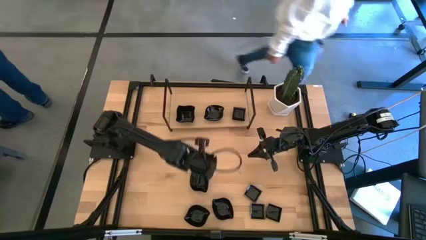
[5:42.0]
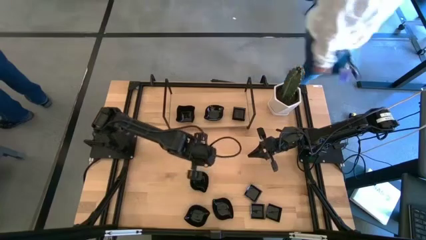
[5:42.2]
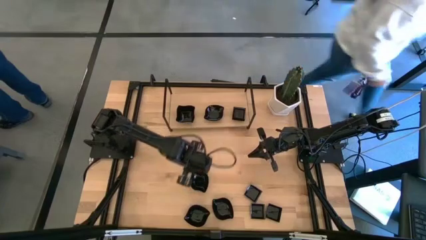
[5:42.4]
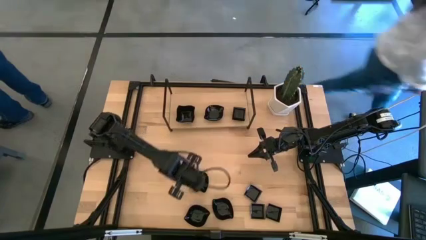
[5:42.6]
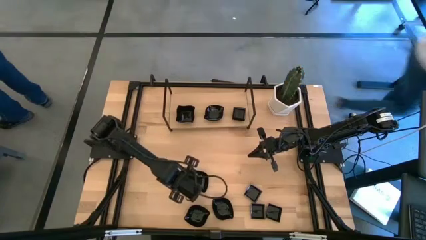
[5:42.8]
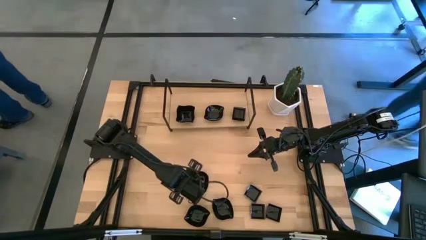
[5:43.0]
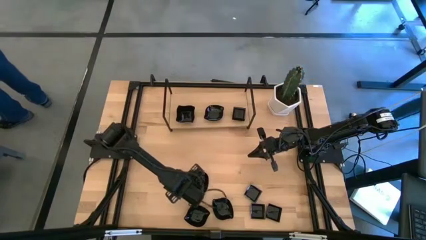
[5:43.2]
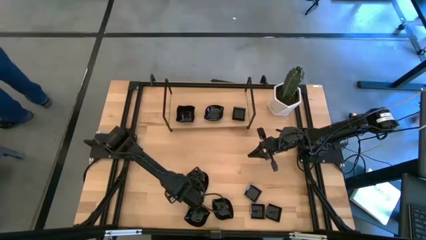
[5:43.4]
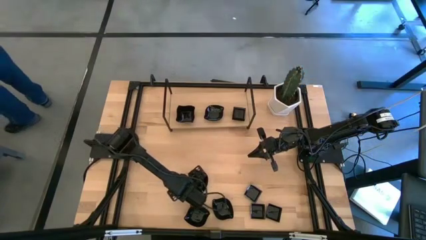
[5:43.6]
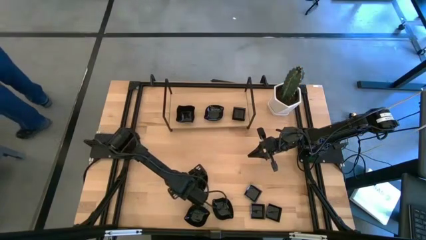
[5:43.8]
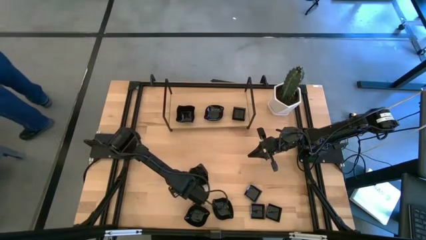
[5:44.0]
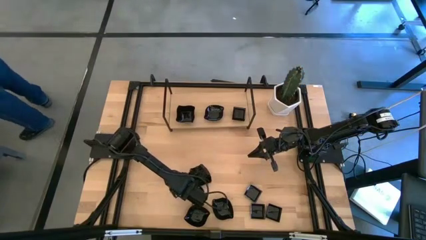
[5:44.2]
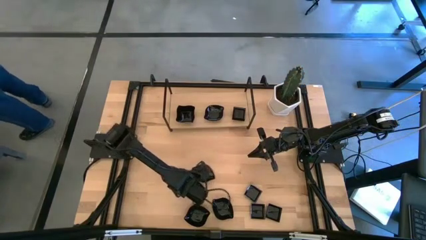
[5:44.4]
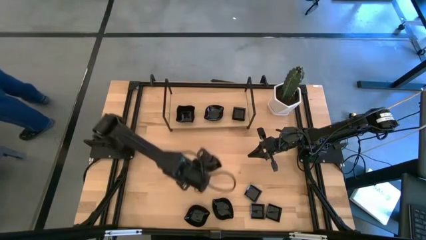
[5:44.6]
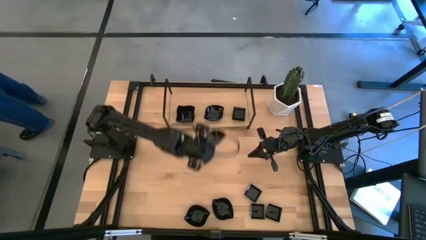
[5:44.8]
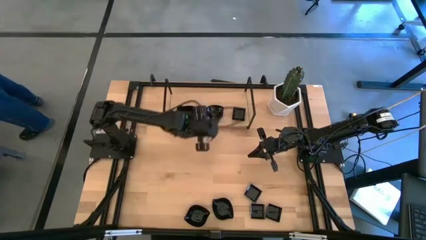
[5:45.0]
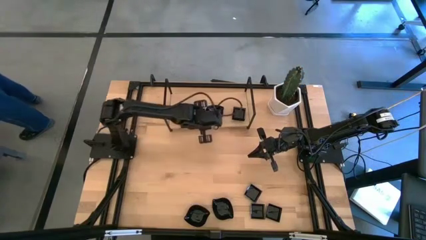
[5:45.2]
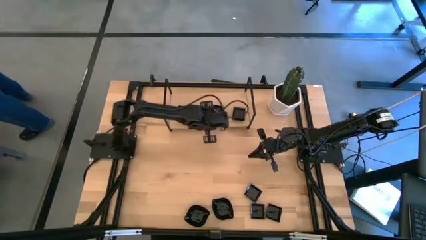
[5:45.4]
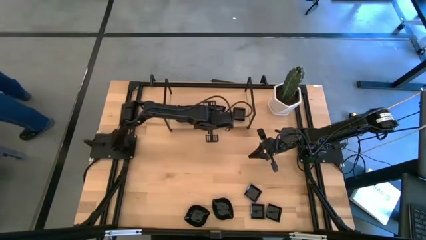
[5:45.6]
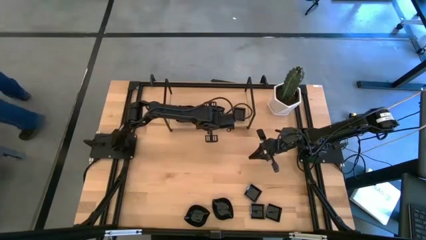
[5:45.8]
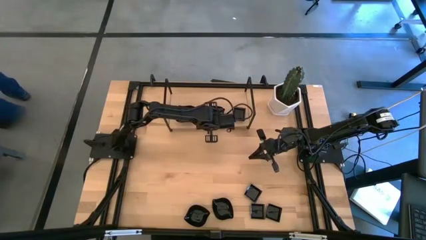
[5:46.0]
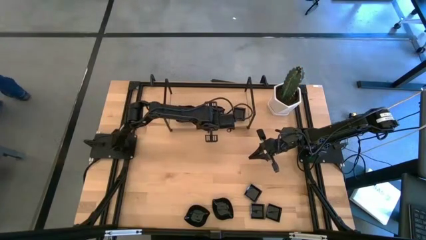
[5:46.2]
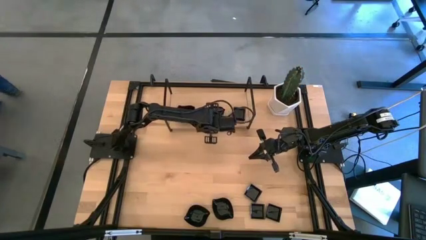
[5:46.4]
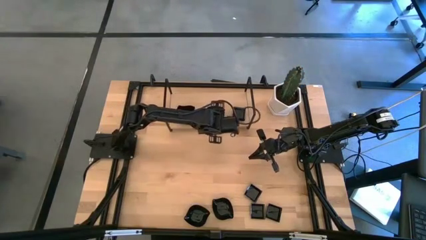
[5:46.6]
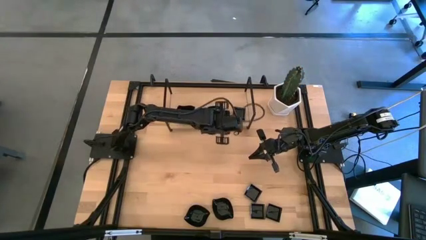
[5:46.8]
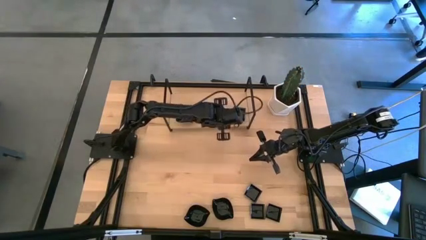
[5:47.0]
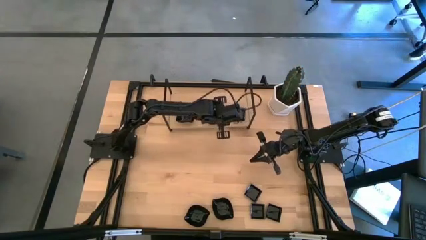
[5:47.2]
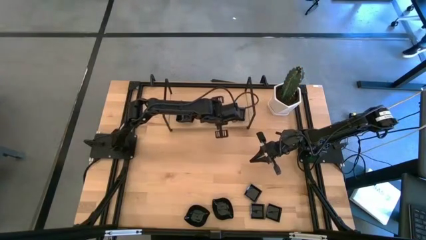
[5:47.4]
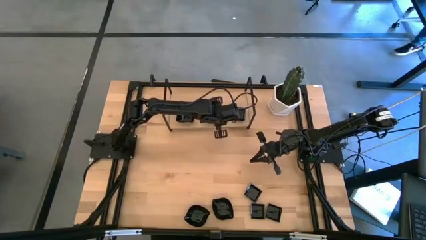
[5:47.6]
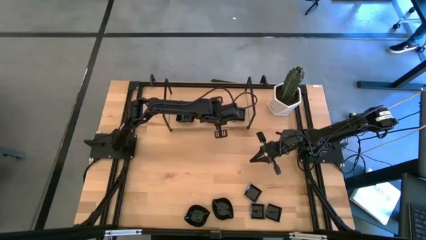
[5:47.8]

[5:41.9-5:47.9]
Task: Pick & Place Mini shaped plates
Stack the top leaf-shaped plate on the top of the leaf-shaped plate on the shelf

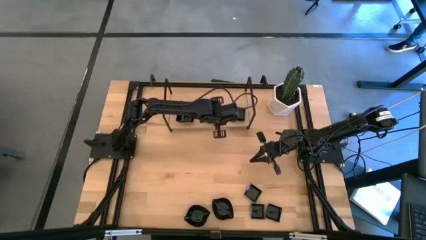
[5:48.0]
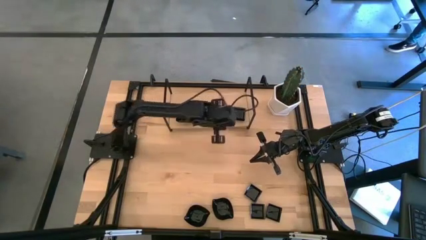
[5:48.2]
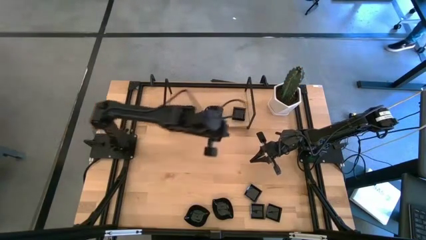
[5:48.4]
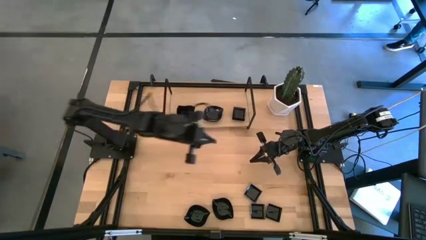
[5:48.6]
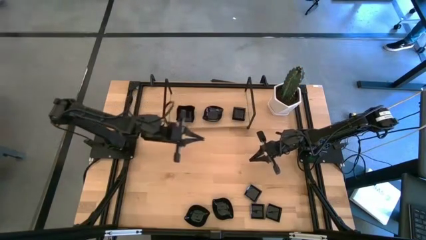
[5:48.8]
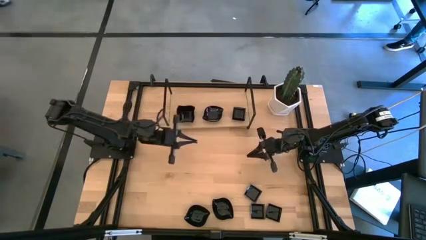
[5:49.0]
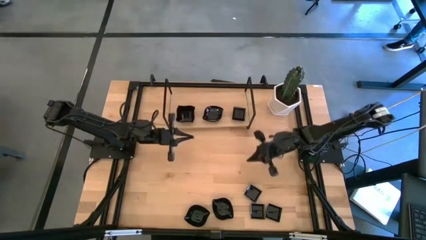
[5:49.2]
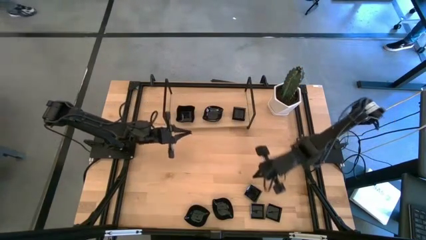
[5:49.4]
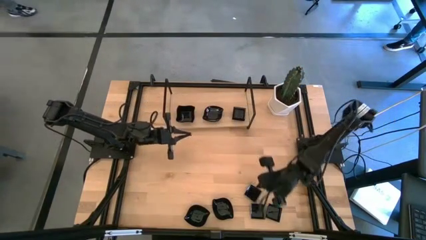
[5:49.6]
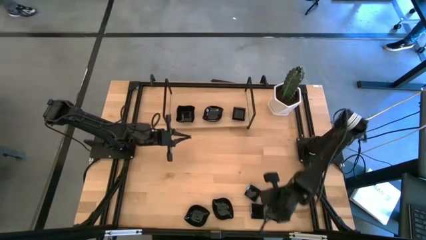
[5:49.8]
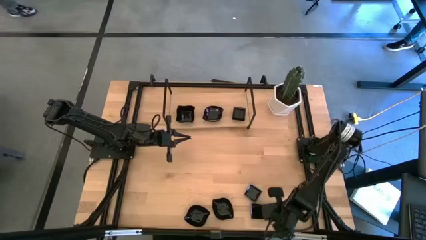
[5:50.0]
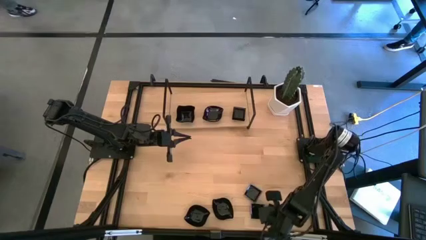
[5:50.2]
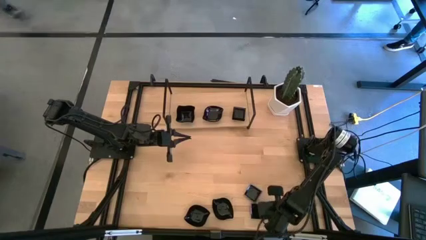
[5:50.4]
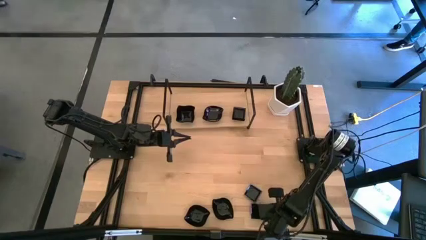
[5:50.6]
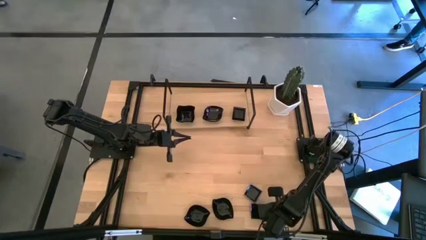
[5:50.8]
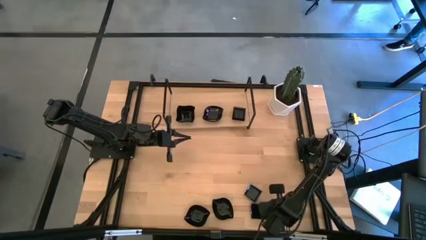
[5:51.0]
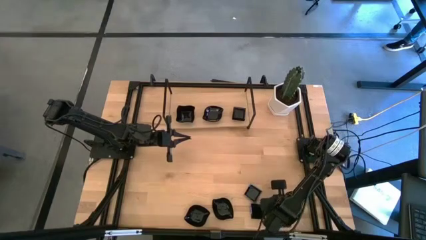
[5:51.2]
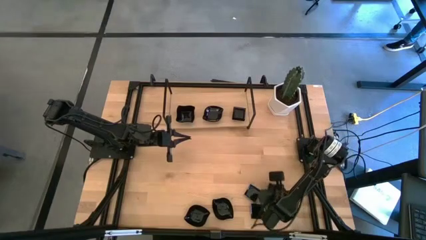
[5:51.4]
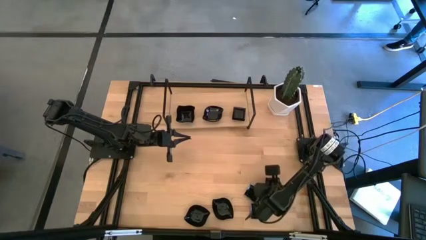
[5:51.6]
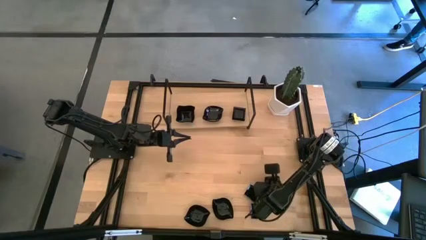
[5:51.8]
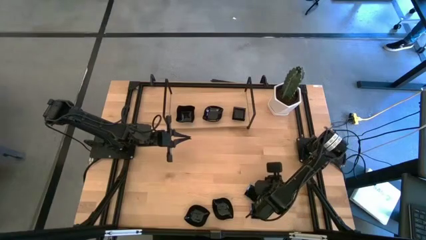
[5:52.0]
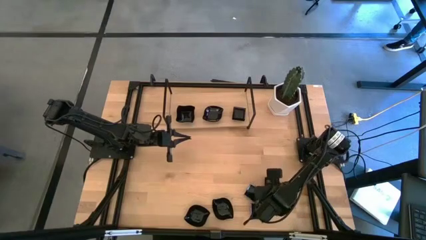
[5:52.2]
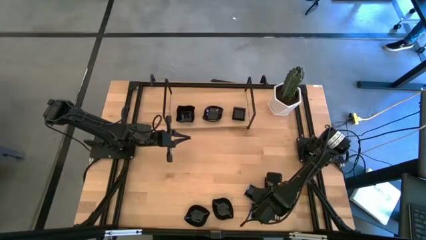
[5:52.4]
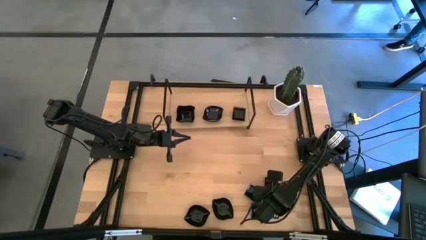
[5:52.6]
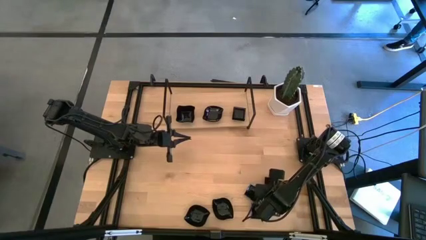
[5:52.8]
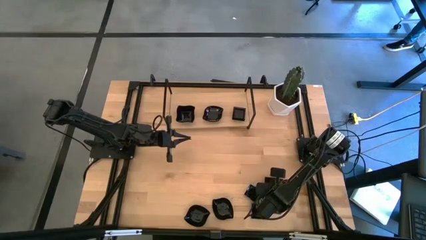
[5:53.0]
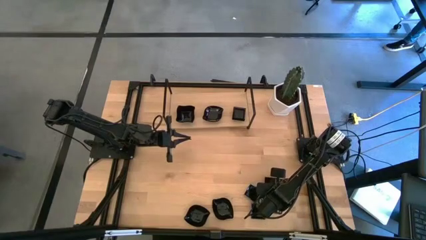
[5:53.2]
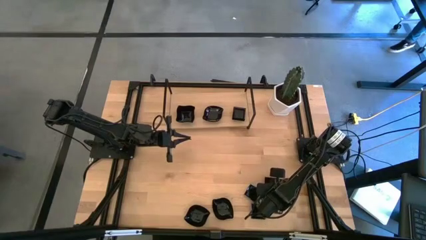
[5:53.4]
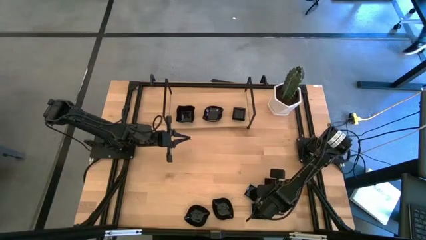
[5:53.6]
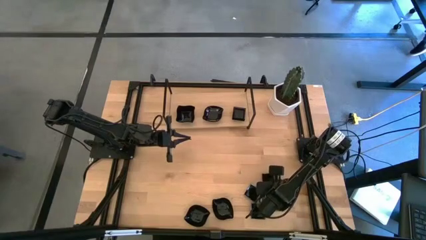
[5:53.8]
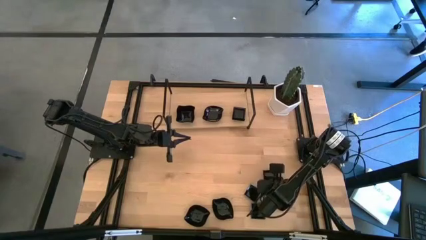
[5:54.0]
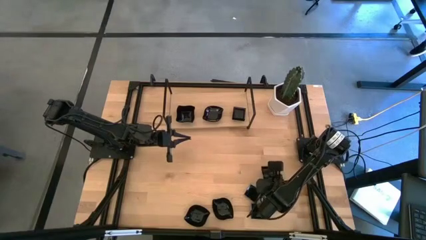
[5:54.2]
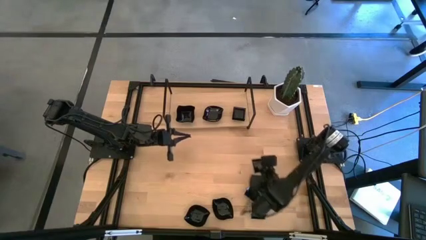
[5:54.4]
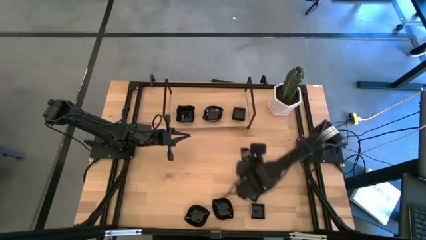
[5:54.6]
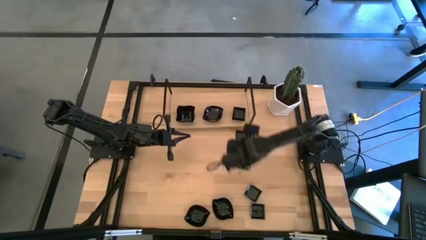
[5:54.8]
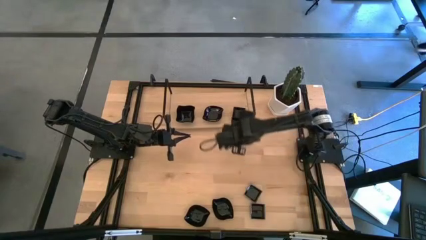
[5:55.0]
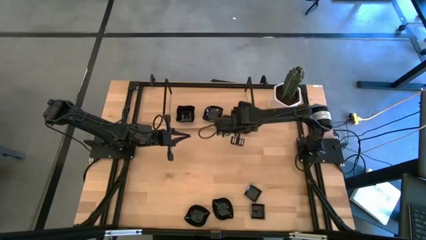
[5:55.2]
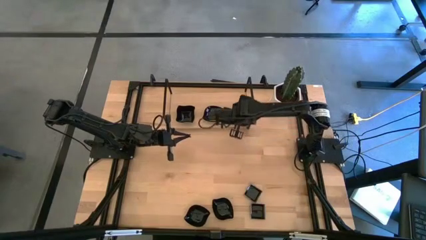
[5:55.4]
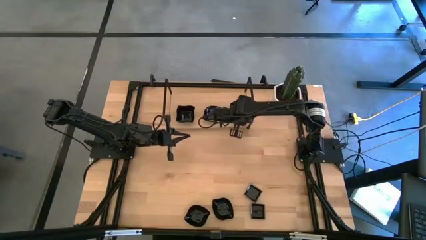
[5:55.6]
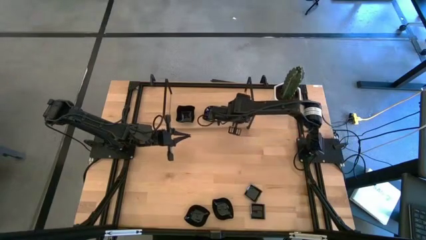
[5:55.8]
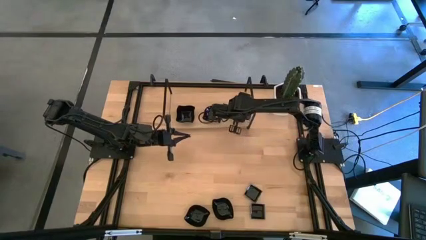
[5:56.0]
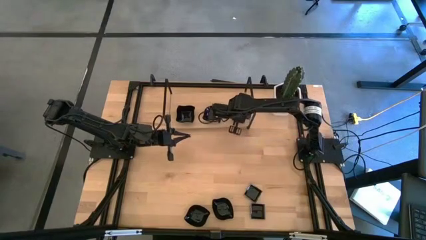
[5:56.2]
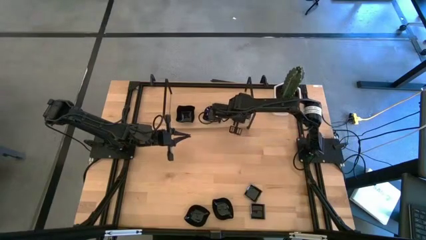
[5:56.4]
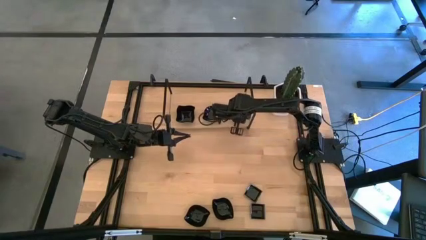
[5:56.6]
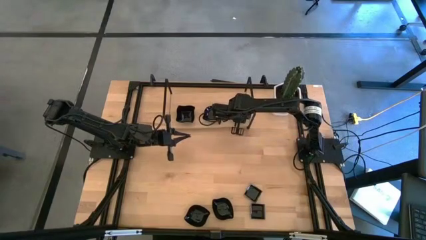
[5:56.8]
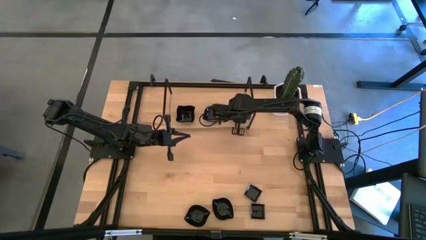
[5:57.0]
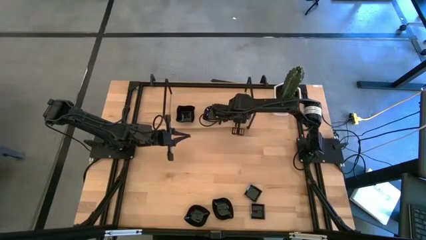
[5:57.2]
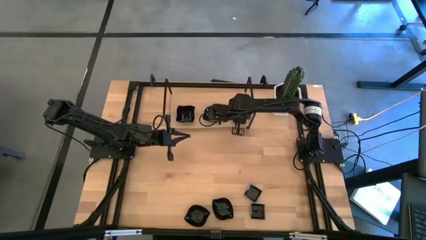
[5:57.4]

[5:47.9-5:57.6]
Stack the bottom right square plate on the top of the square plate on the shelf
